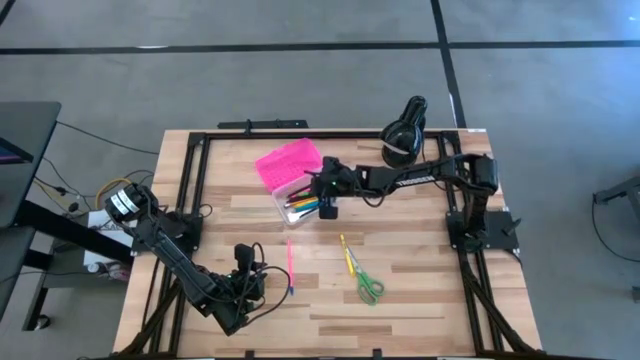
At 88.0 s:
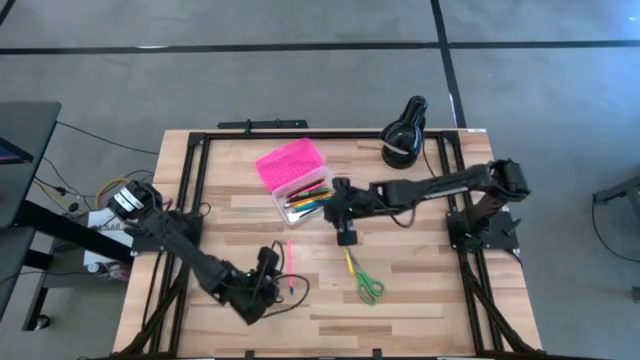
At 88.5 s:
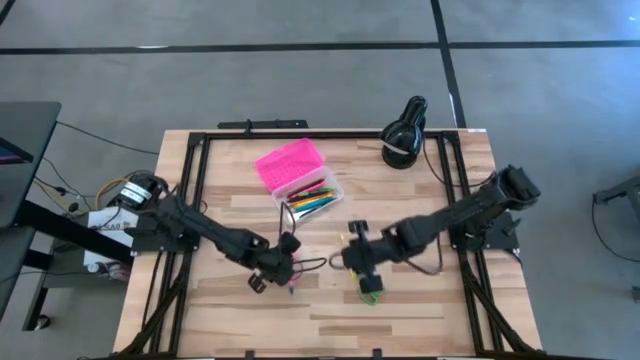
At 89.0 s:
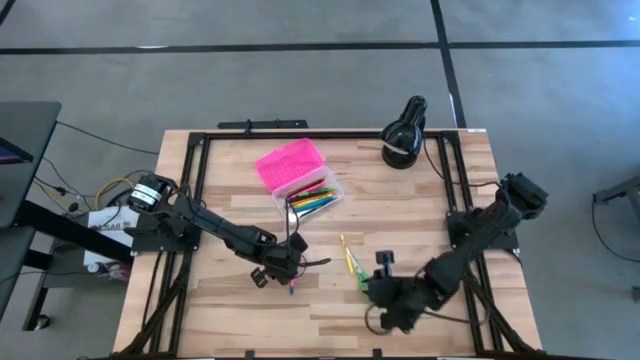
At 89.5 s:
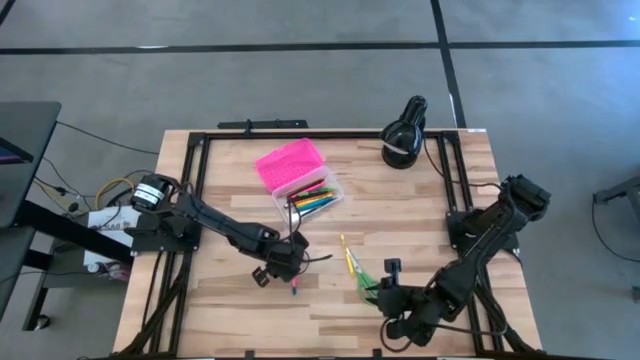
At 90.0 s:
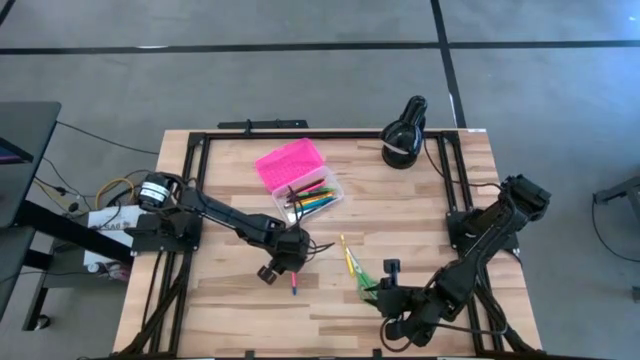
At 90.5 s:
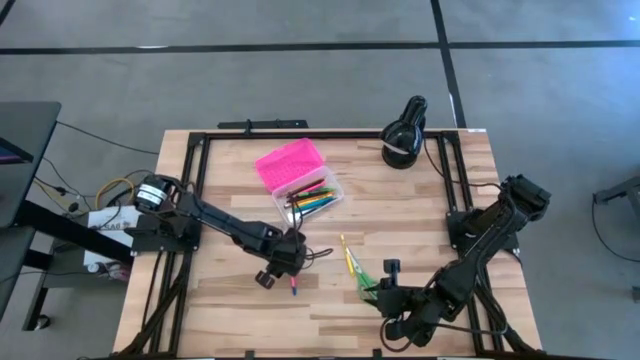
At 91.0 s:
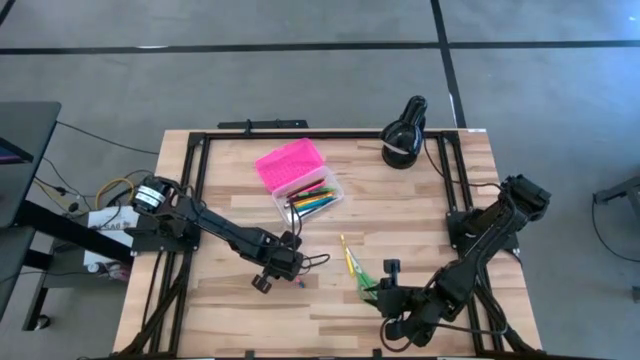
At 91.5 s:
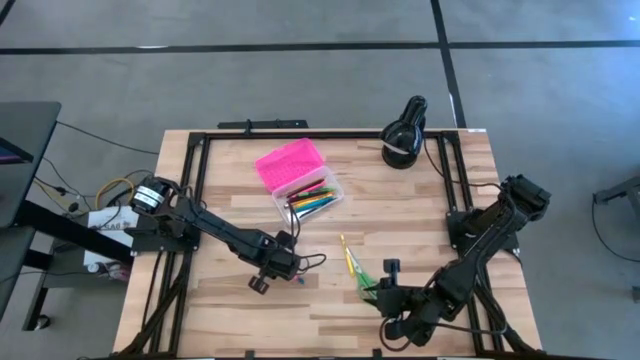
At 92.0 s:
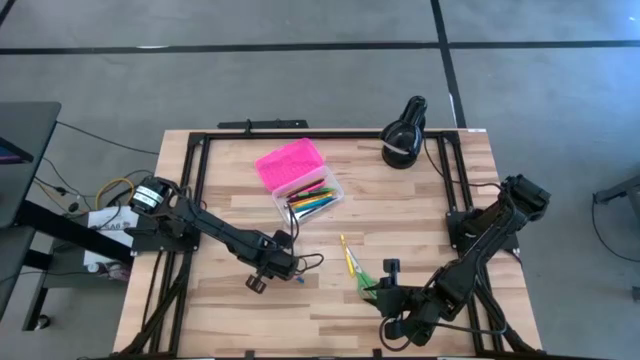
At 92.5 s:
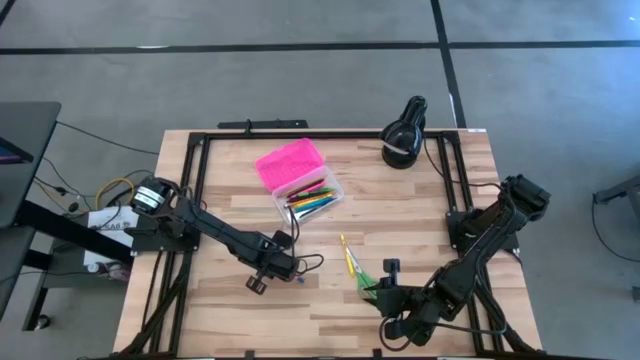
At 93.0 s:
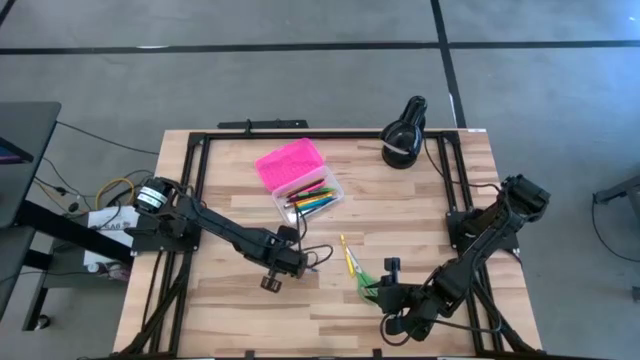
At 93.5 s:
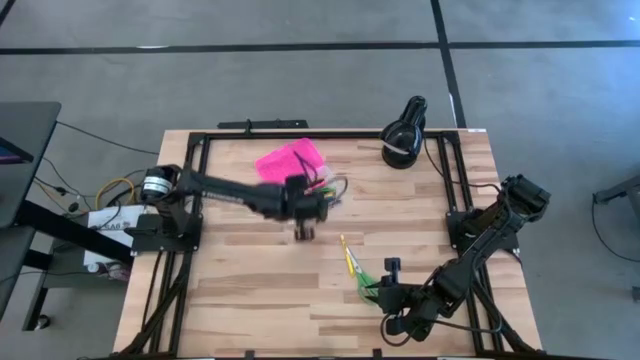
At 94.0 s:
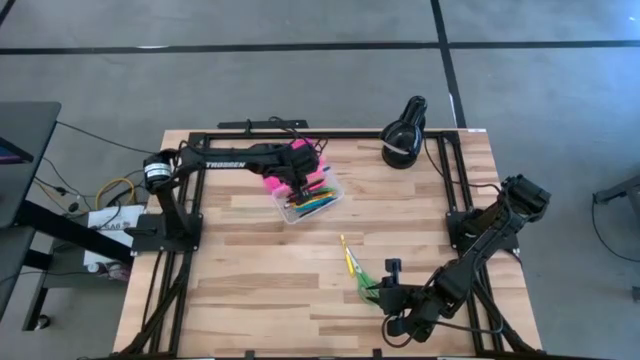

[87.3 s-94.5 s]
Task: Pick & place school supplies into a supply box
Put the pink pencil into the black supply box

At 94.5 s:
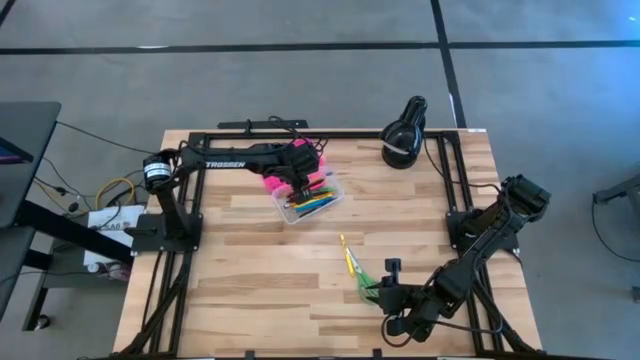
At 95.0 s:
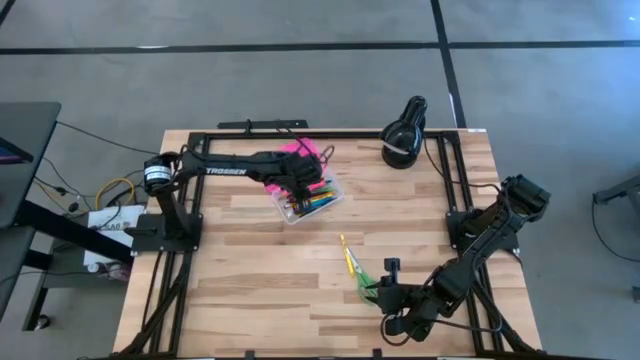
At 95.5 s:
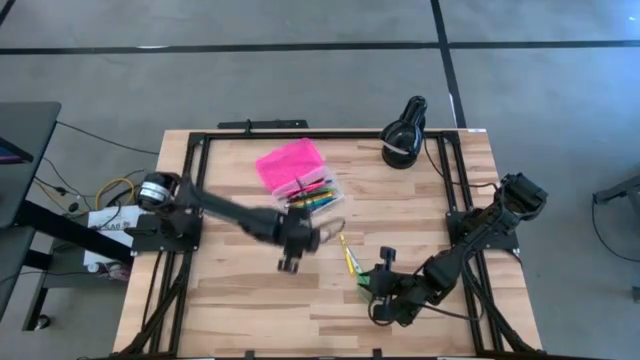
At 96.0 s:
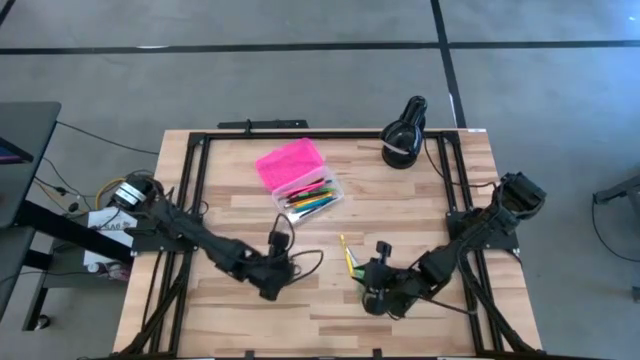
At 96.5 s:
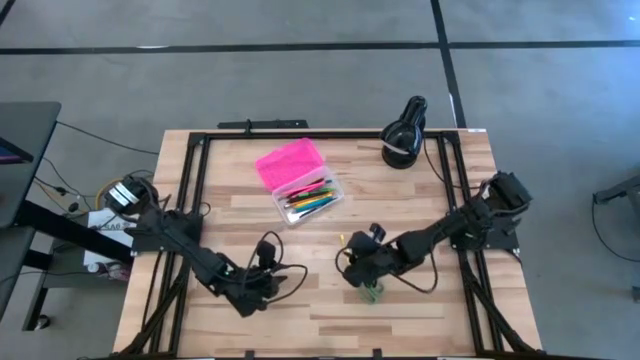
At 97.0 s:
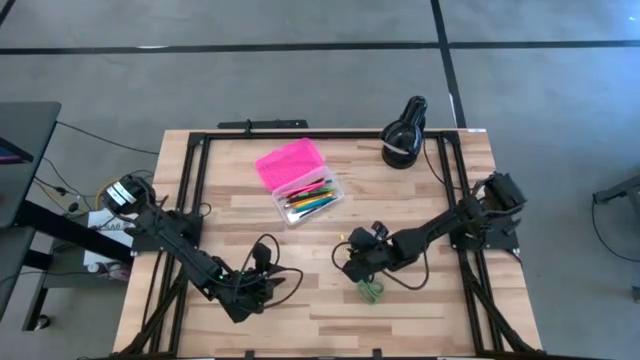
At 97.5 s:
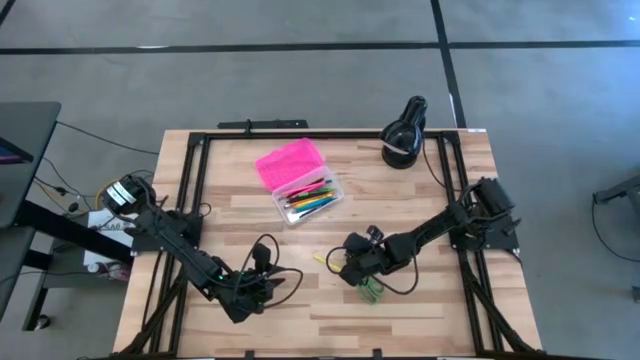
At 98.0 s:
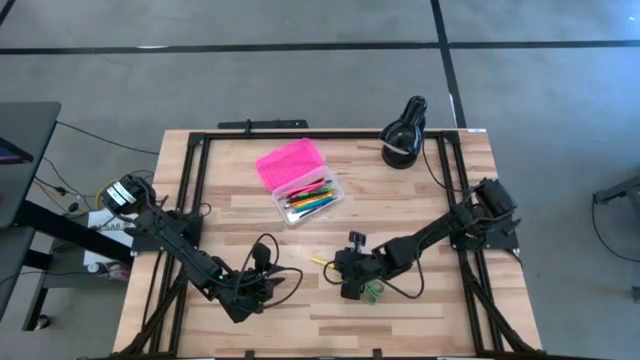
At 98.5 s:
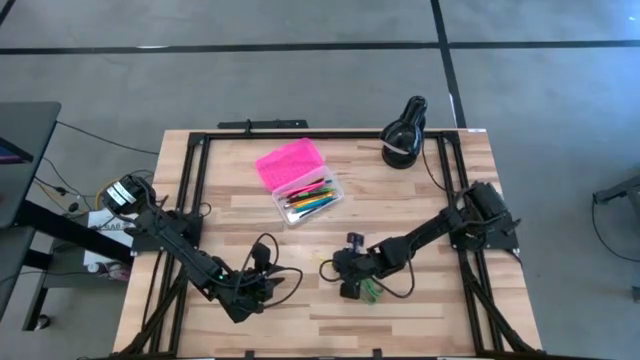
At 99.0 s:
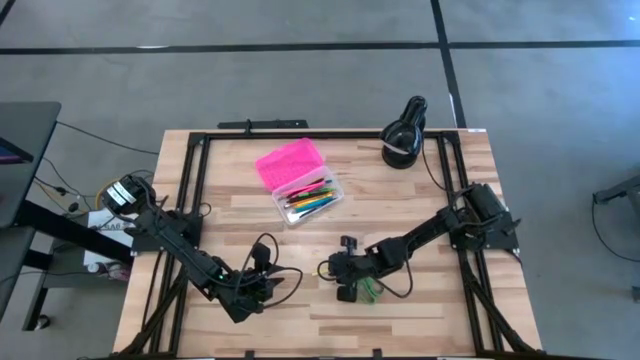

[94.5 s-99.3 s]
Put the yellow pen into the black supply box

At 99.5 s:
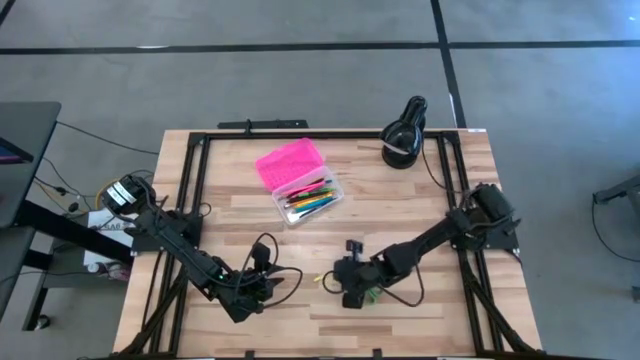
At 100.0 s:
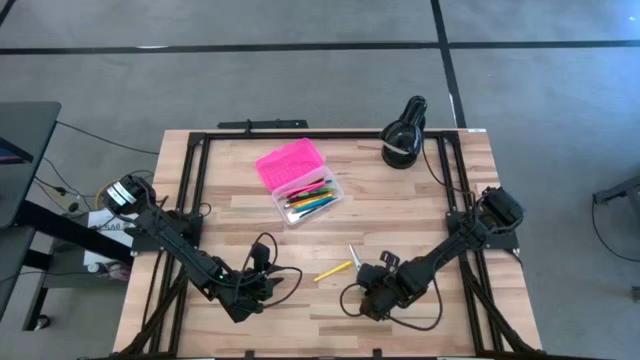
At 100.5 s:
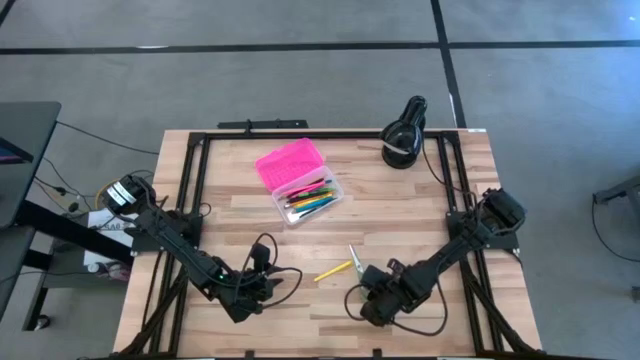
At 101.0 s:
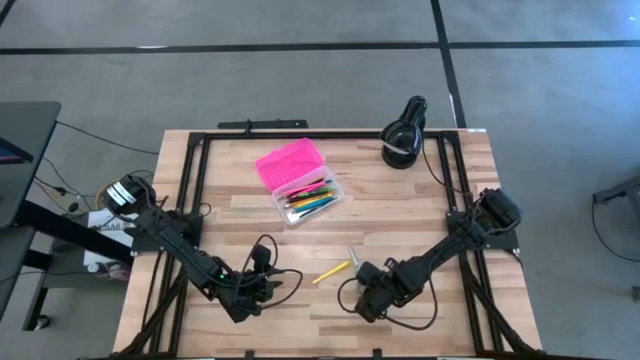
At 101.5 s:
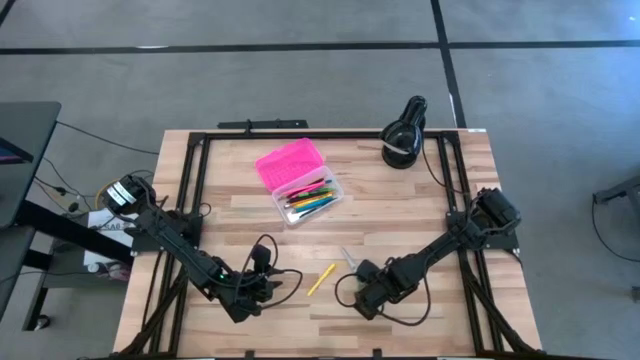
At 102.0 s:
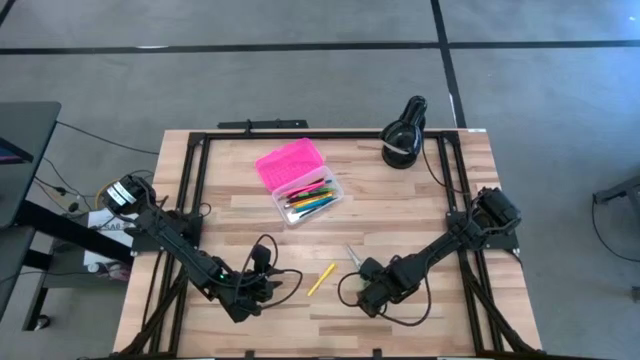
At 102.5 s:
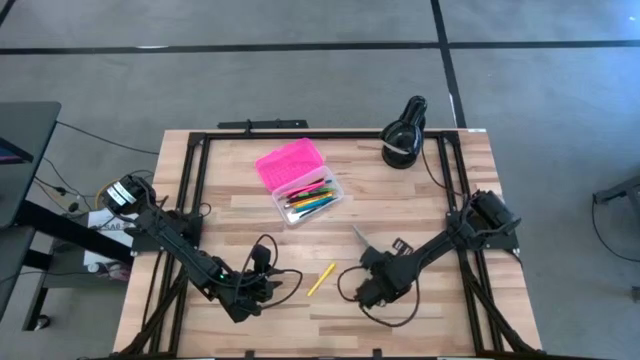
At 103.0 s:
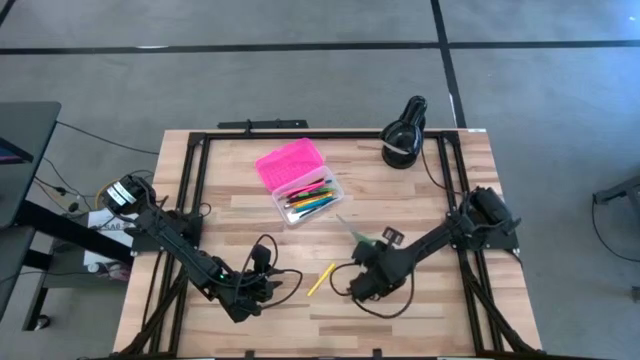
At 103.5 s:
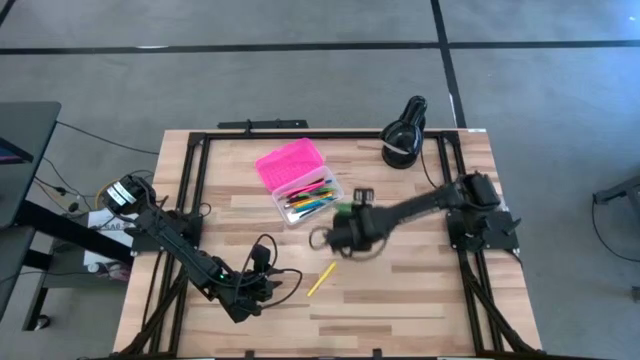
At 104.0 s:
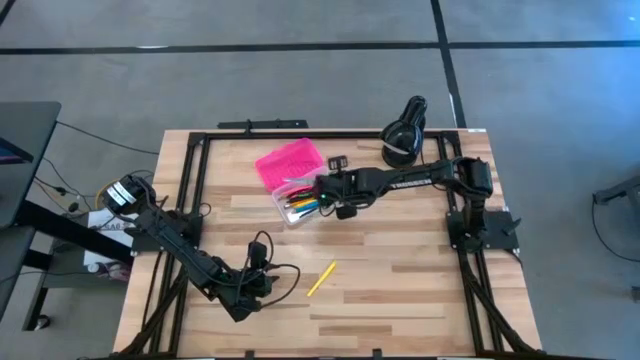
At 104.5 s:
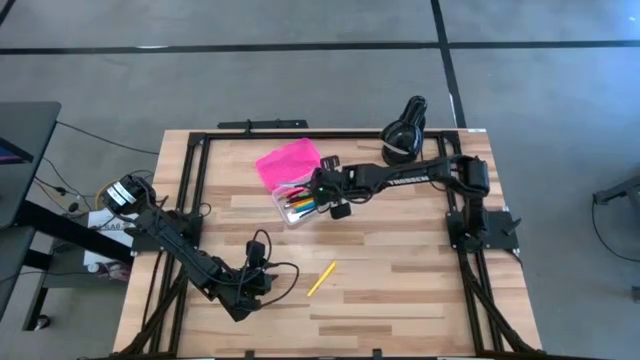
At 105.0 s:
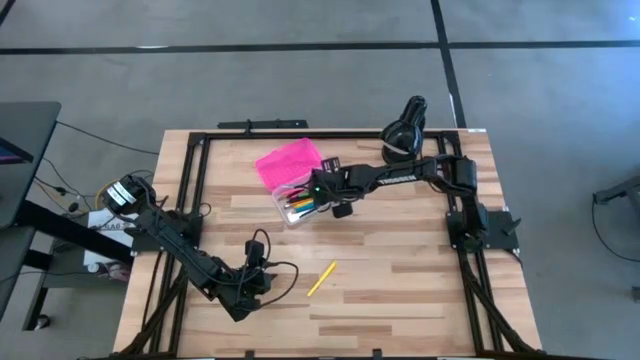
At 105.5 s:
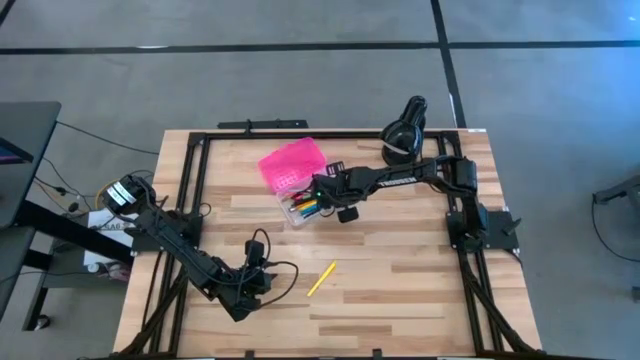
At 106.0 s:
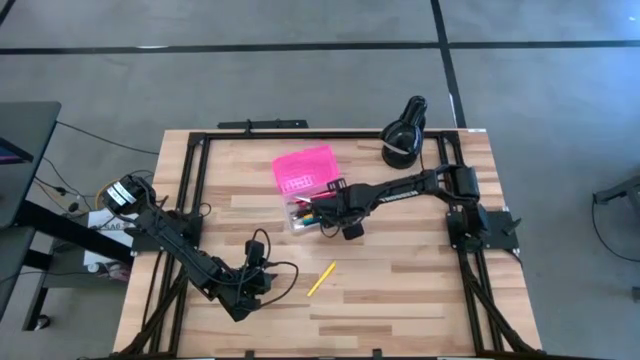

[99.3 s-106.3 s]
Put the green scissors into the black supply box

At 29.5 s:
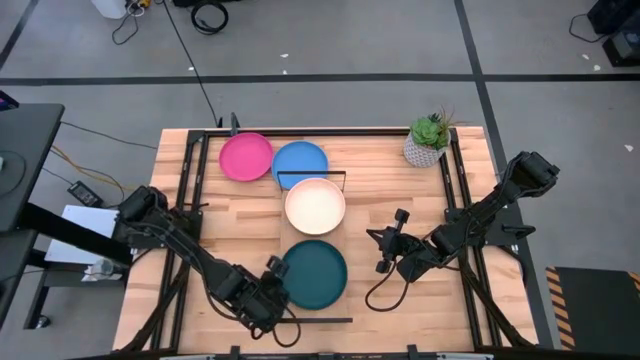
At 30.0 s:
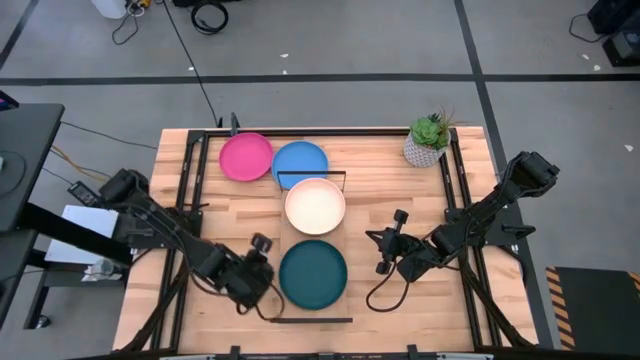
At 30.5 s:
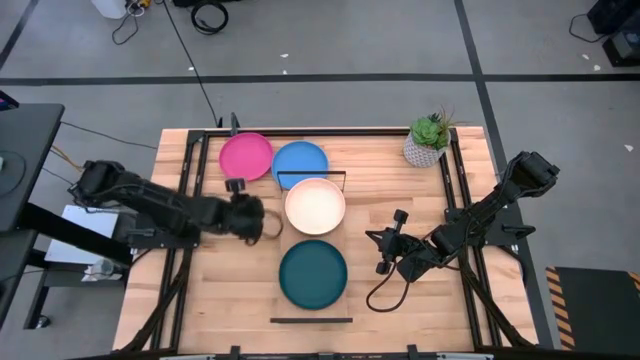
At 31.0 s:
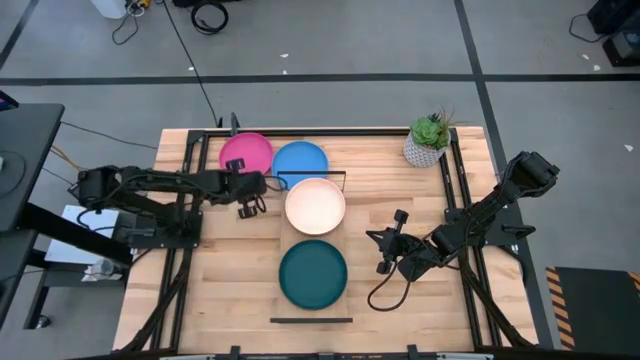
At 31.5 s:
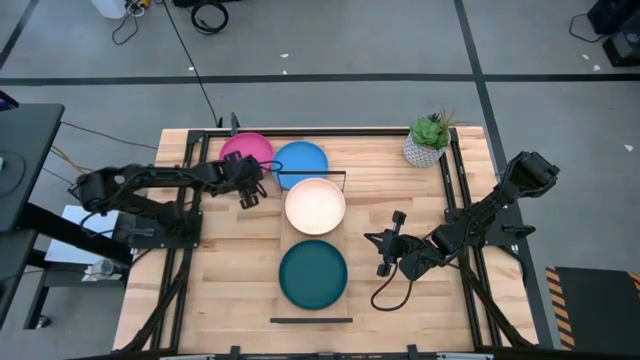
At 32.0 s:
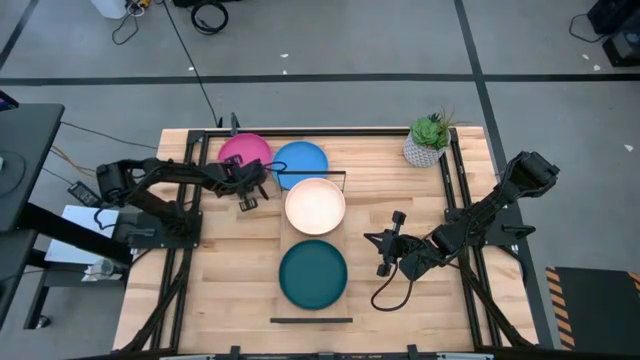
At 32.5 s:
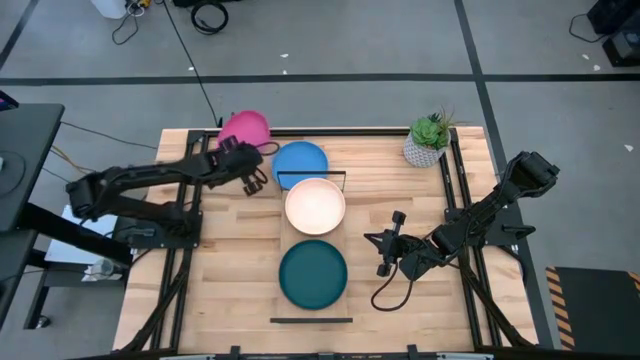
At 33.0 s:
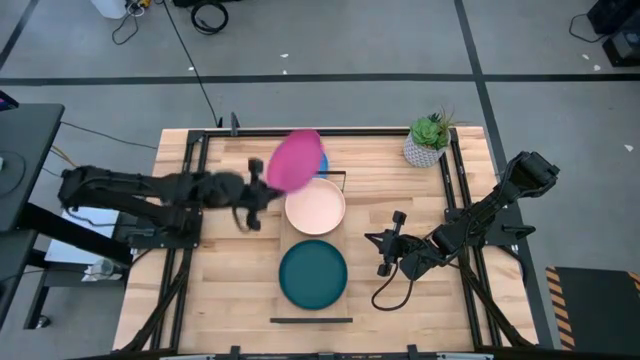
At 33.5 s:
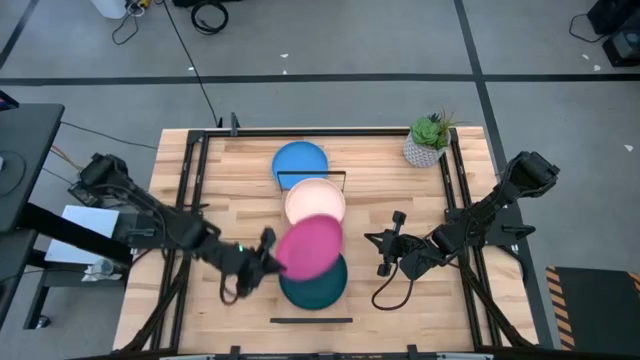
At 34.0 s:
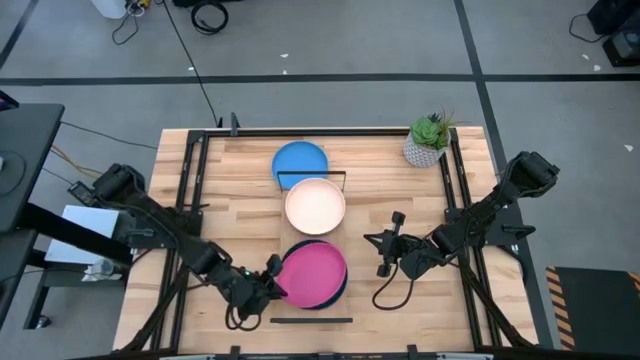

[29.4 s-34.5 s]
Task: Place and stack plates onto a shelf
Stack the pink plate on top of the green plate on the shelf
